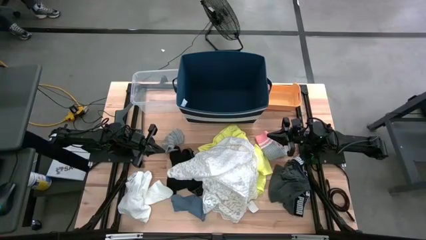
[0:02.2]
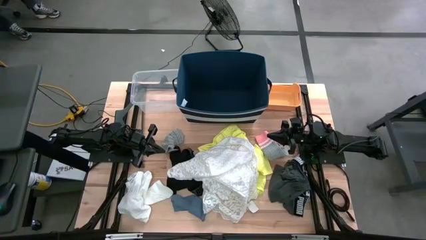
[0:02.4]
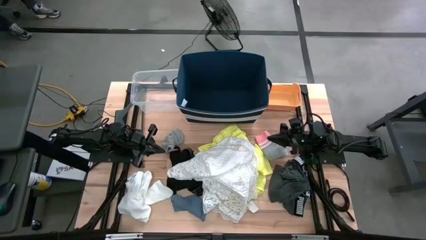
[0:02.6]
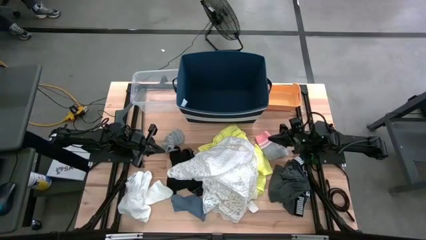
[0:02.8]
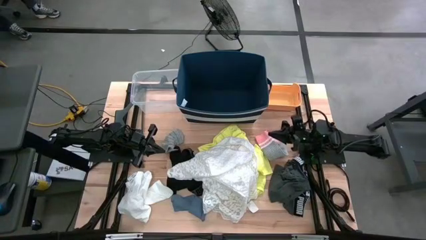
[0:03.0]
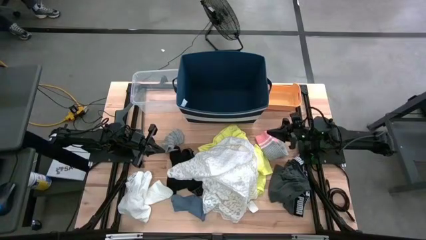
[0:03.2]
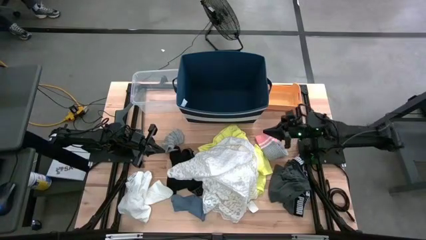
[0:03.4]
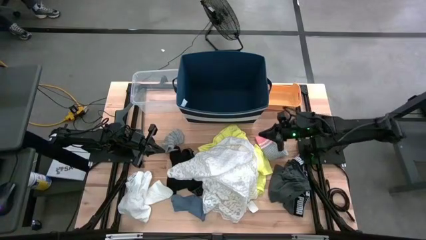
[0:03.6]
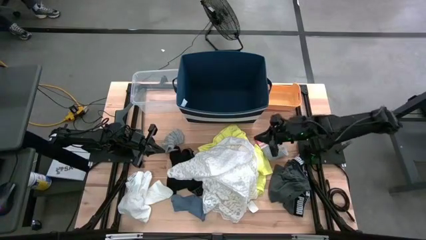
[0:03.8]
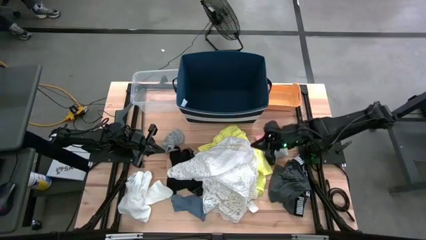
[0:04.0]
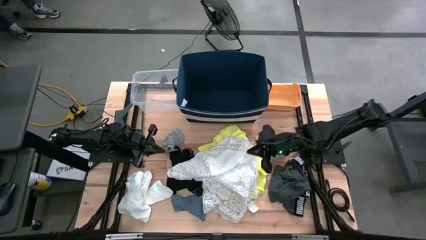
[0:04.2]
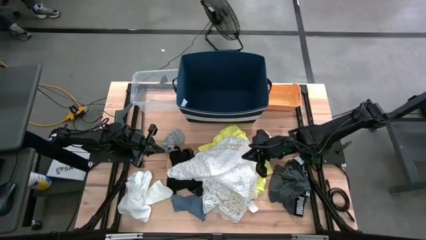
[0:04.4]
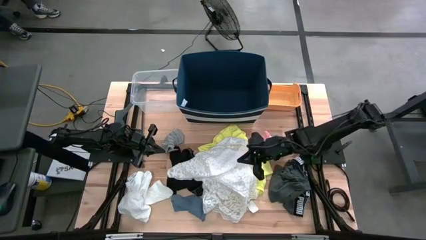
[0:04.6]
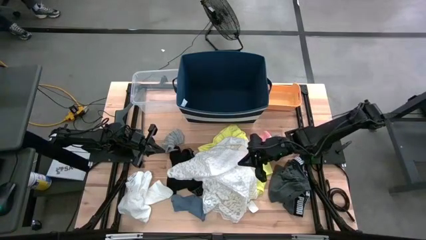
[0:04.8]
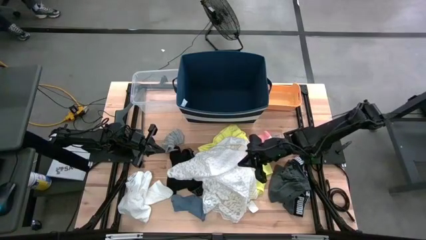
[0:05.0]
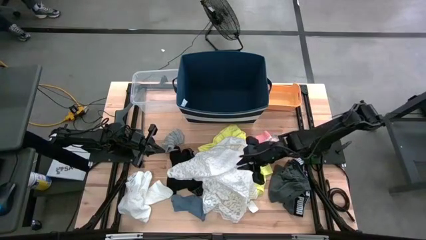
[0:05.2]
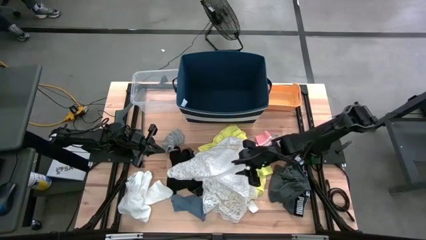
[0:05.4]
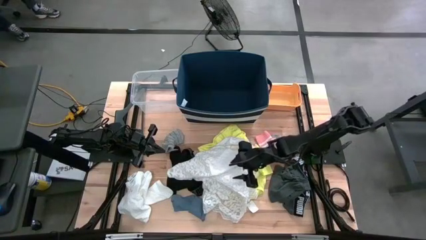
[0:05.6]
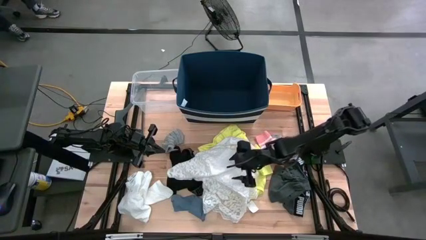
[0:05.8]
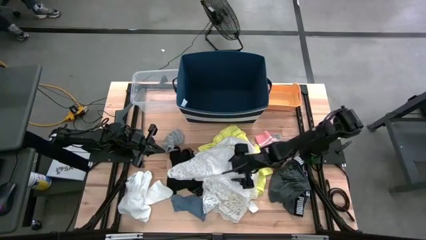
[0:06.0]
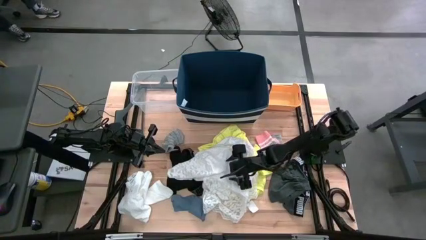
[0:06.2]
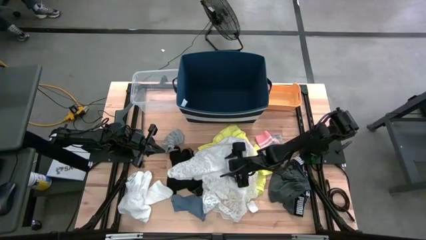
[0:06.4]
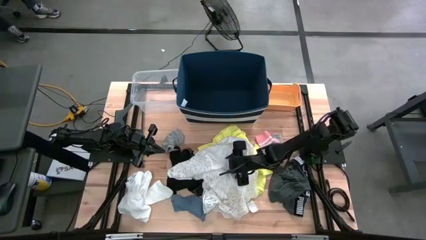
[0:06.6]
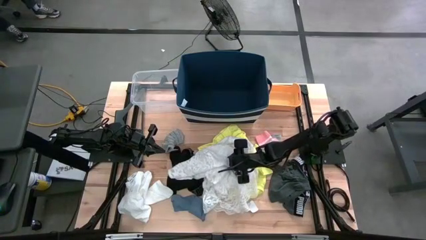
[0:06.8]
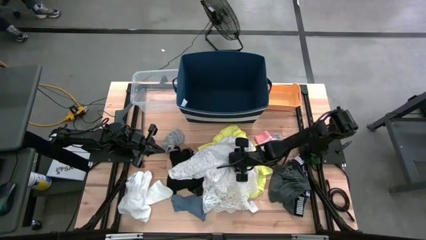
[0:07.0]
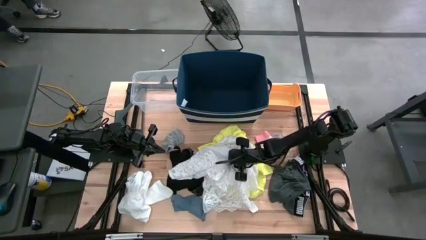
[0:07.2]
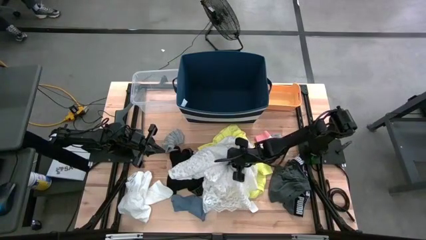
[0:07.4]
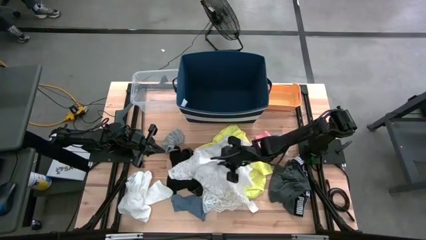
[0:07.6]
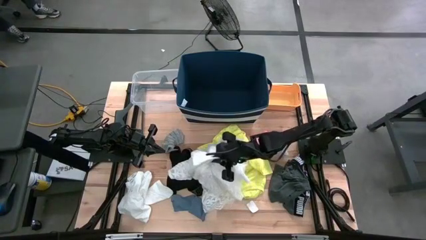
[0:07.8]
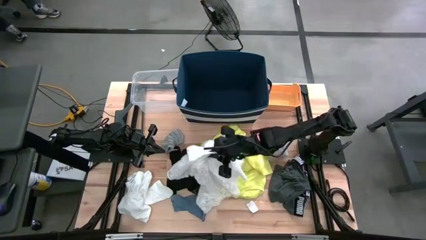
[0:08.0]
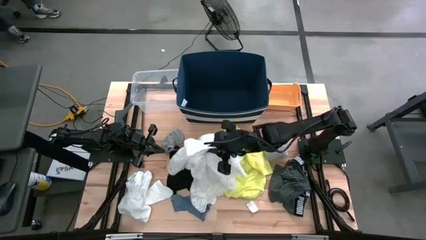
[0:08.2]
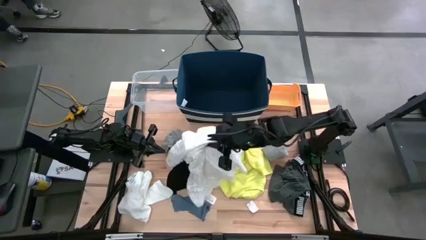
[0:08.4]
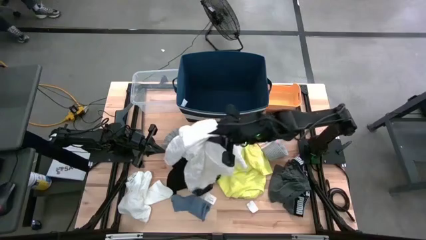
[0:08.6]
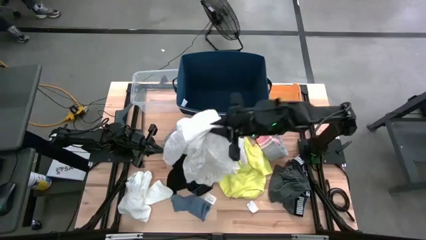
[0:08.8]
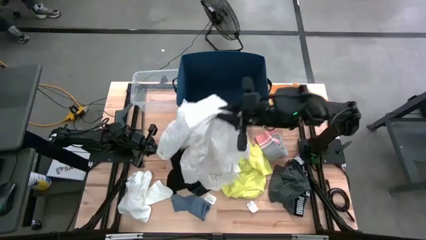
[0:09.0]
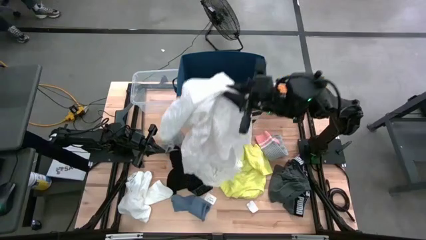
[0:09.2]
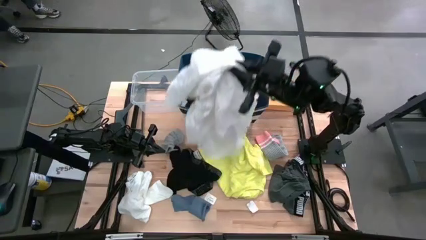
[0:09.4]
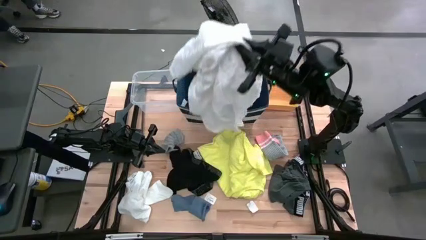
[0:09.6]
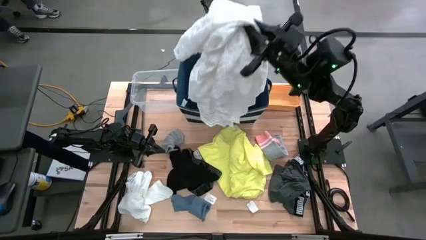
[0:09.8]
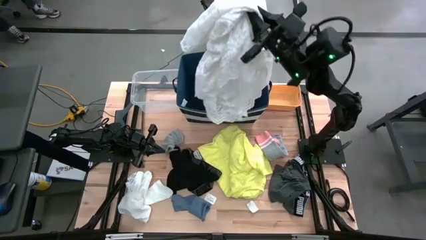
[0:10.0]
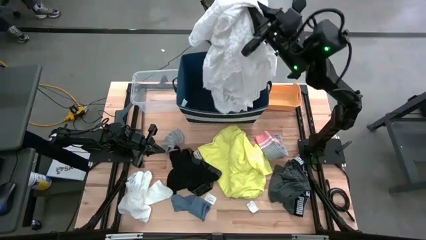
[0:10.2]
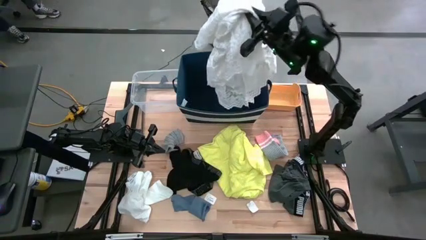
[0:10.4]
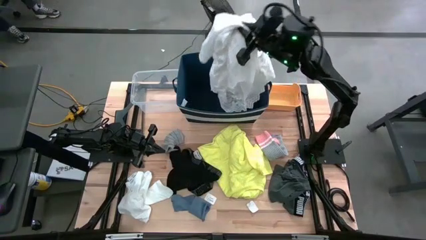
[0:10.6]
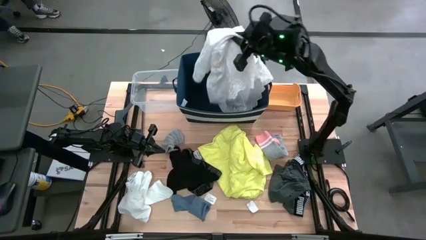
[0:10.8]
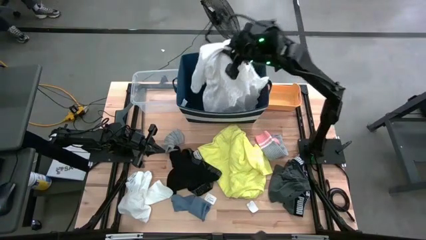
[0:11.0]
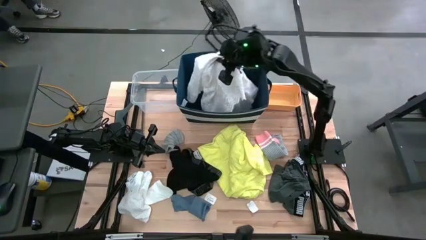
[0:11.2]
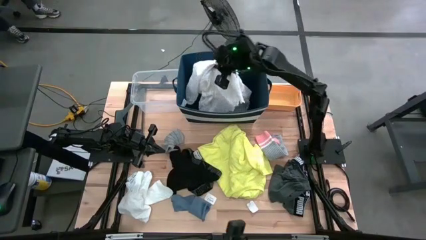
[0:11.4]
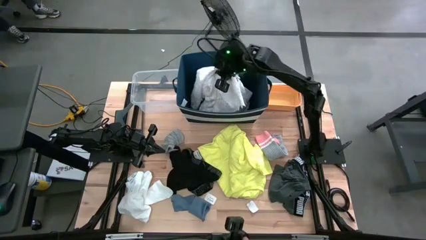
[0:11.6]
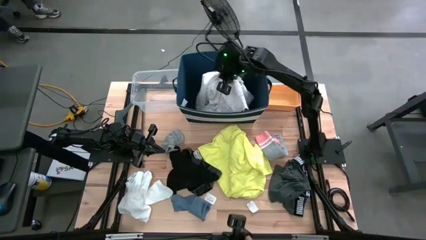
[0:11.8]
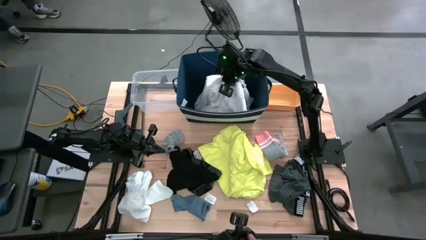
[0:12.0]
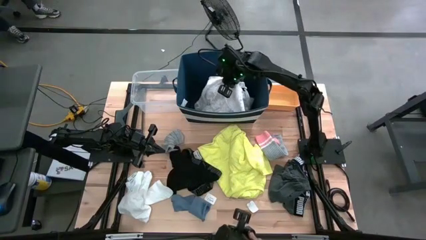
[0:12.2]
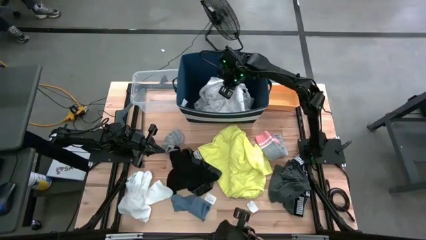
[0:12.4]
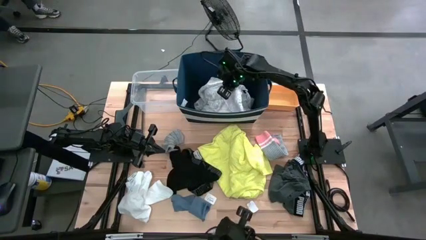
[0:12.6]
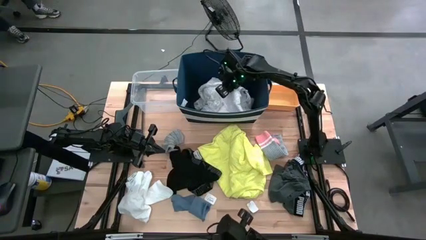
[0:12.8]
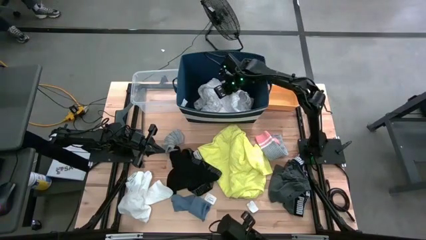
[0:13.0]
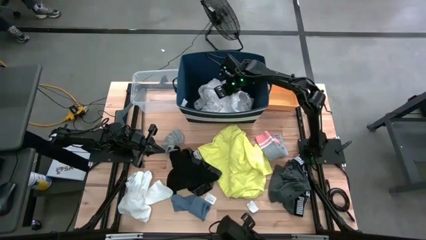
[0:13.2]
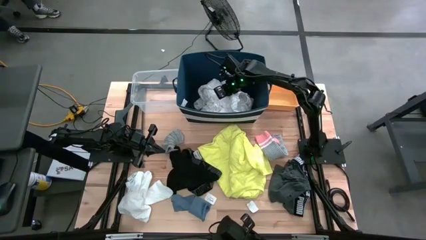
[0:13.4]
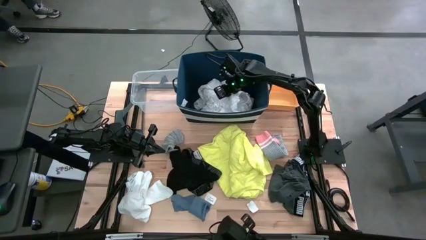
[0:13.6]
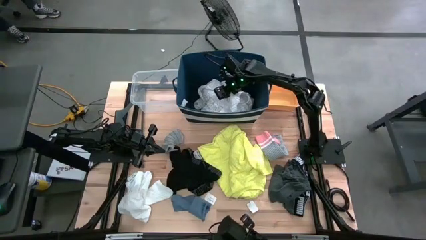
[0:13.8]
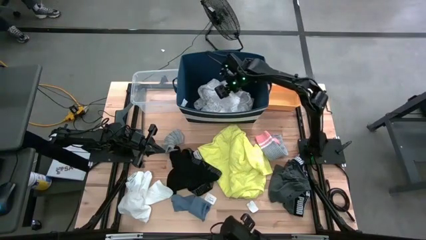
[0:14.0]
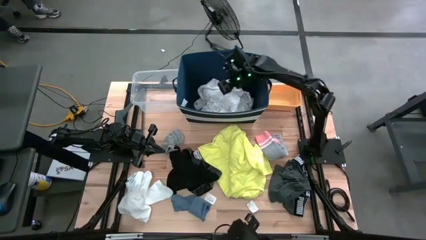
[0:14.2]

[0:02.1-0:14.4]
Task: Pick & Place Cloths
Put the white dress into the blue basket
